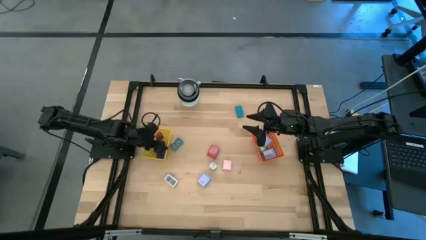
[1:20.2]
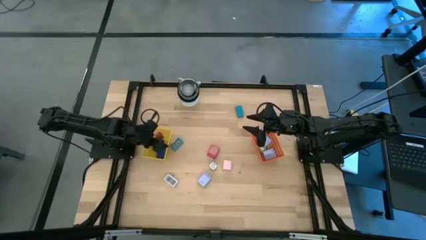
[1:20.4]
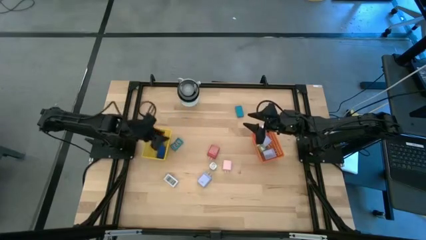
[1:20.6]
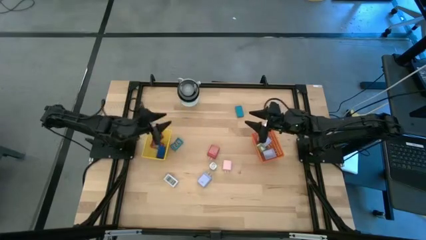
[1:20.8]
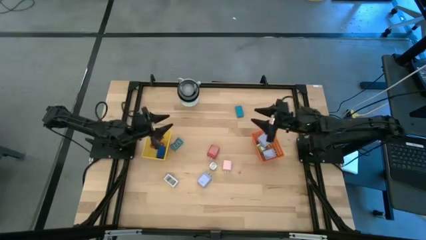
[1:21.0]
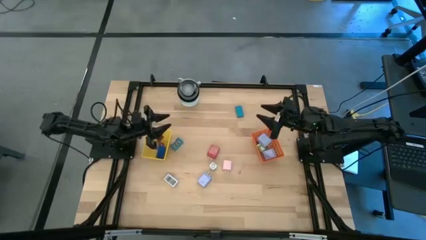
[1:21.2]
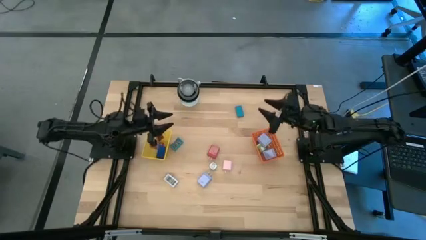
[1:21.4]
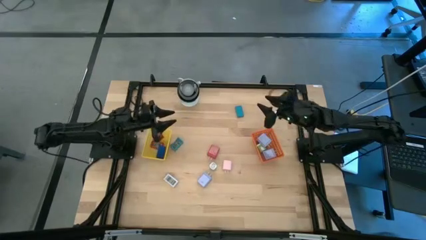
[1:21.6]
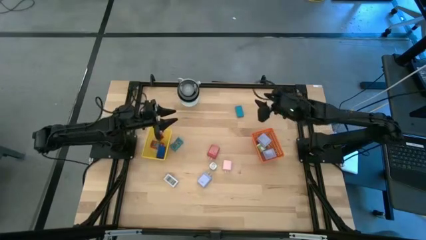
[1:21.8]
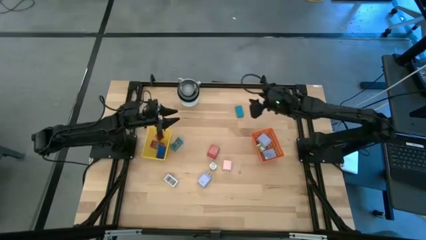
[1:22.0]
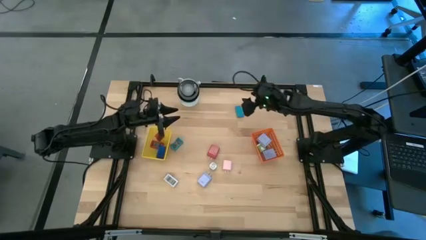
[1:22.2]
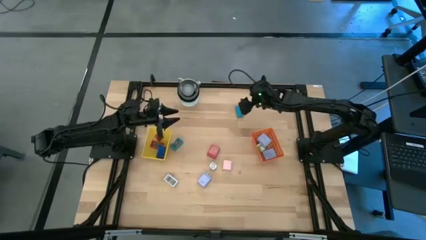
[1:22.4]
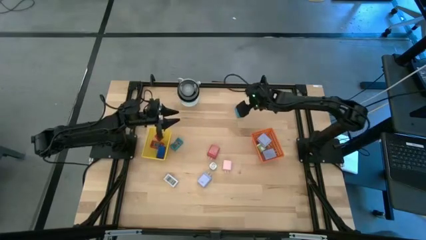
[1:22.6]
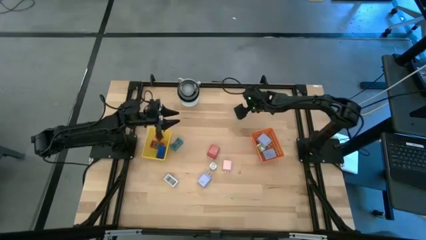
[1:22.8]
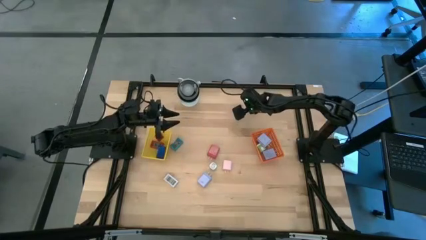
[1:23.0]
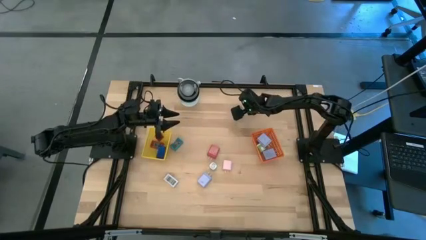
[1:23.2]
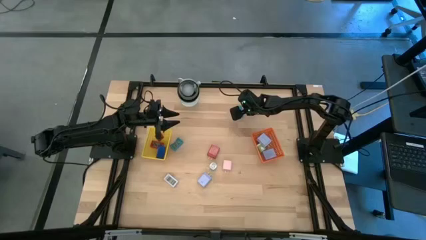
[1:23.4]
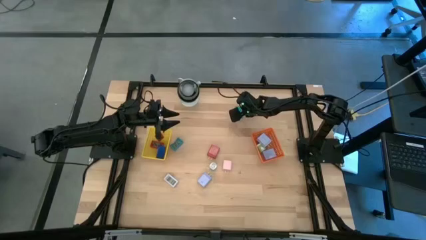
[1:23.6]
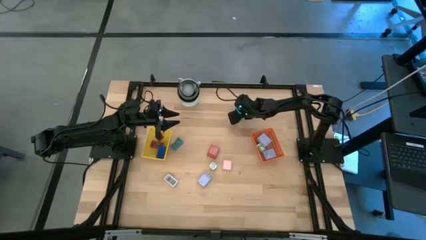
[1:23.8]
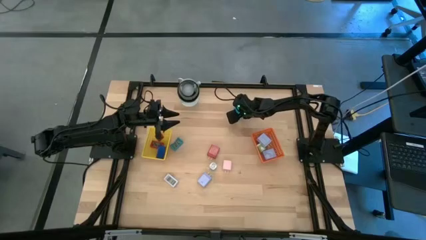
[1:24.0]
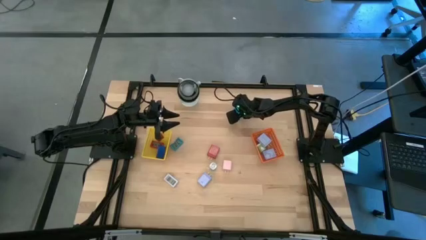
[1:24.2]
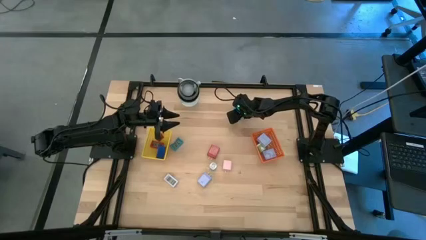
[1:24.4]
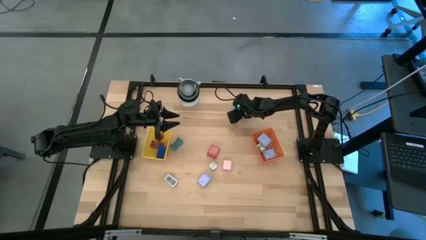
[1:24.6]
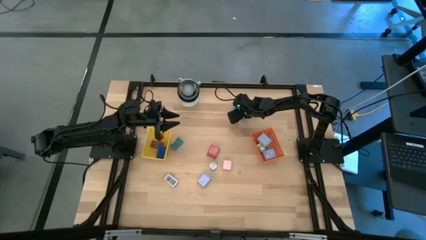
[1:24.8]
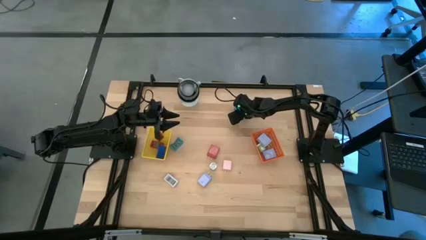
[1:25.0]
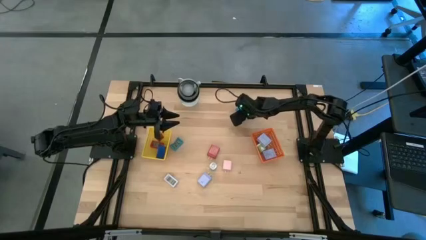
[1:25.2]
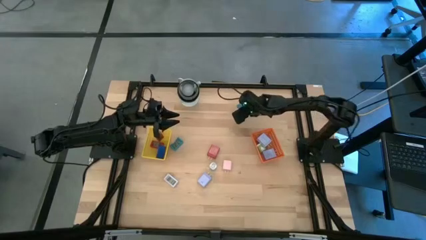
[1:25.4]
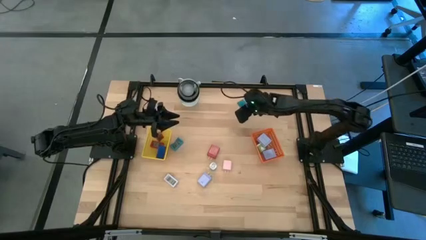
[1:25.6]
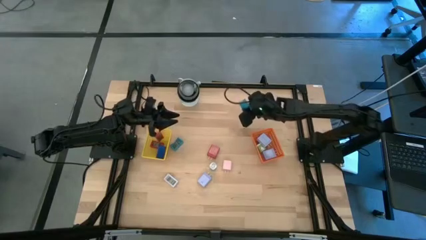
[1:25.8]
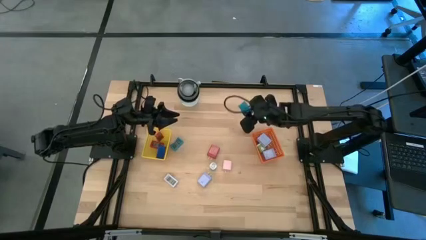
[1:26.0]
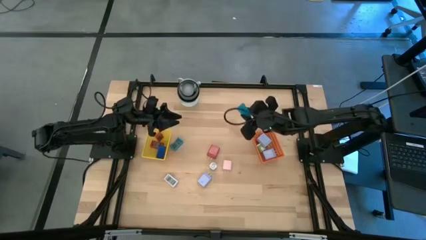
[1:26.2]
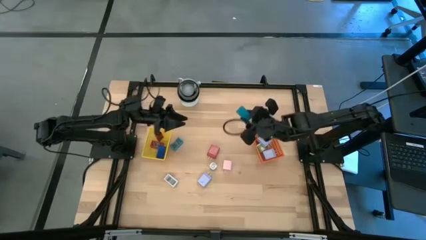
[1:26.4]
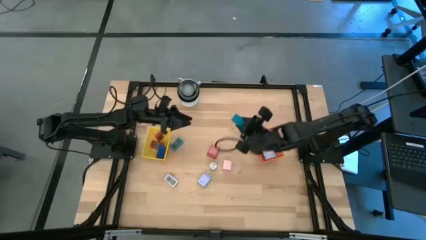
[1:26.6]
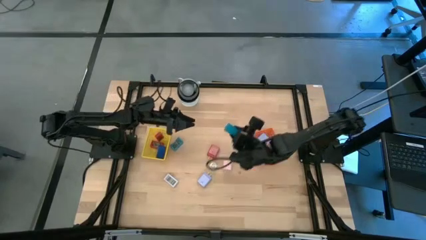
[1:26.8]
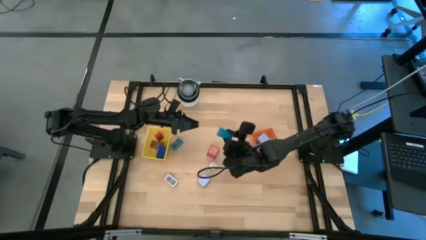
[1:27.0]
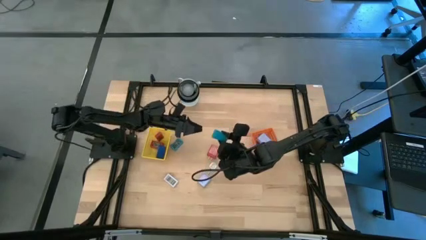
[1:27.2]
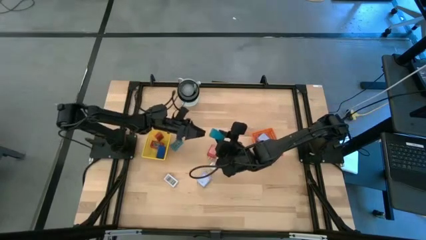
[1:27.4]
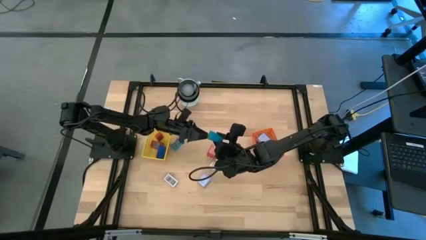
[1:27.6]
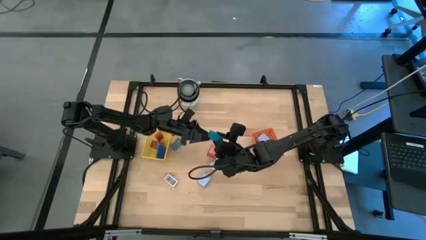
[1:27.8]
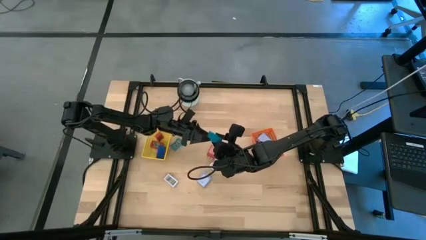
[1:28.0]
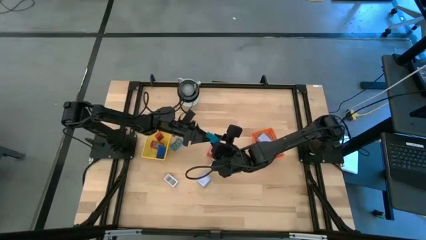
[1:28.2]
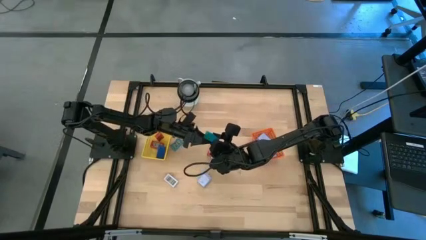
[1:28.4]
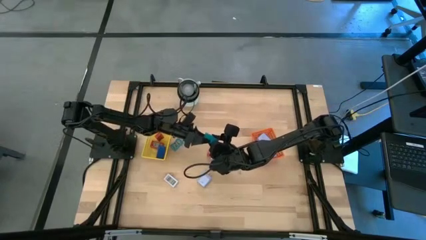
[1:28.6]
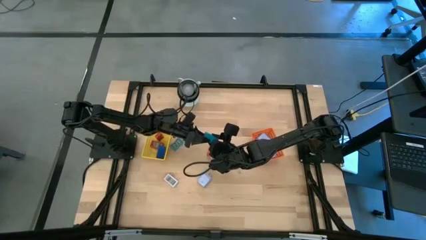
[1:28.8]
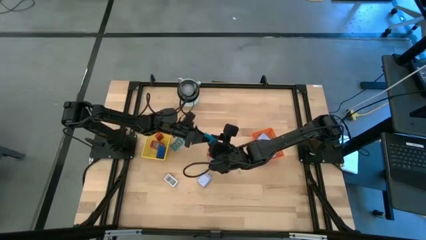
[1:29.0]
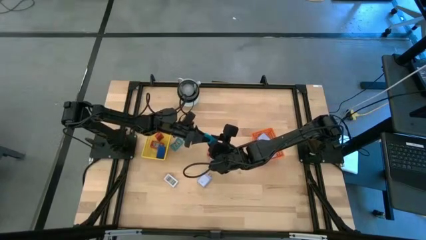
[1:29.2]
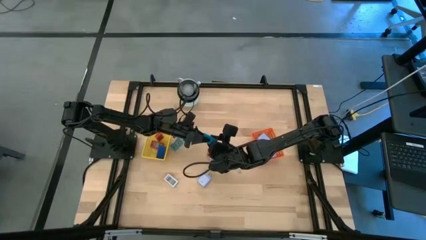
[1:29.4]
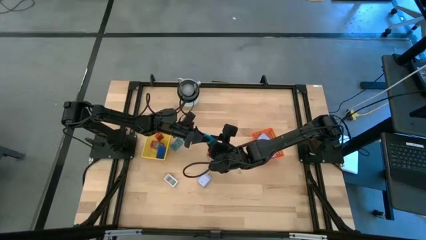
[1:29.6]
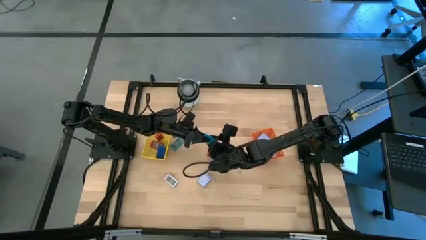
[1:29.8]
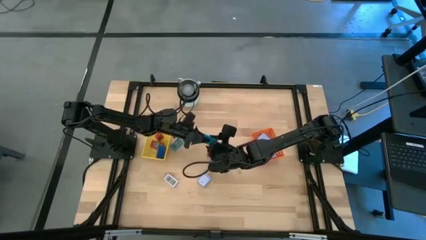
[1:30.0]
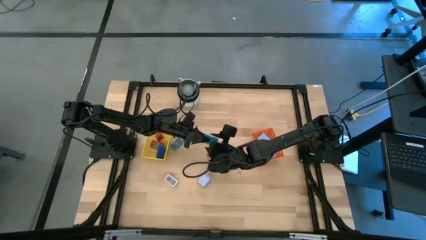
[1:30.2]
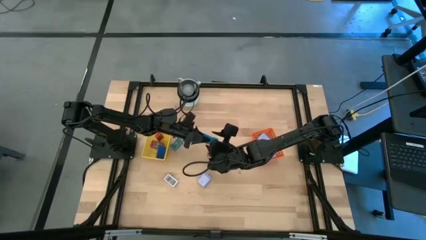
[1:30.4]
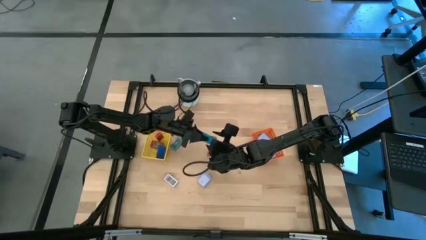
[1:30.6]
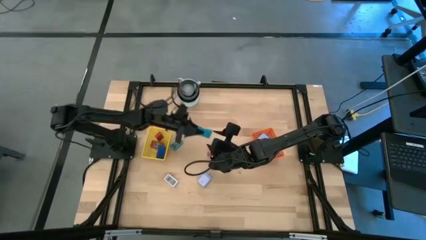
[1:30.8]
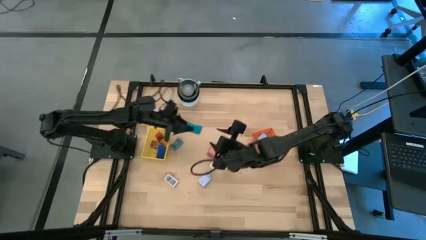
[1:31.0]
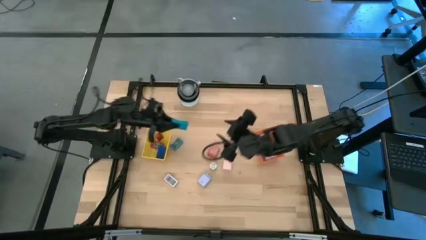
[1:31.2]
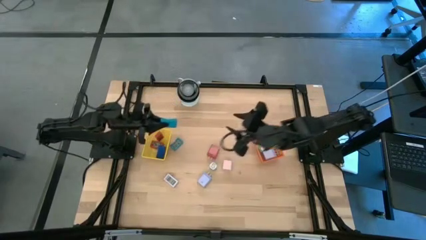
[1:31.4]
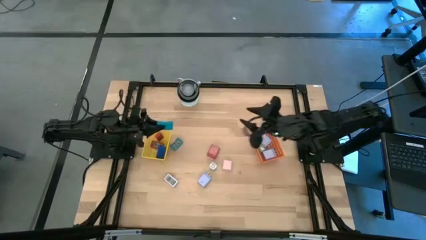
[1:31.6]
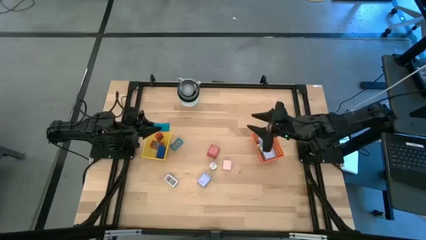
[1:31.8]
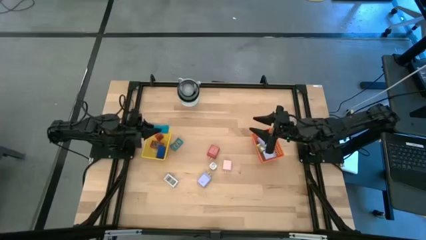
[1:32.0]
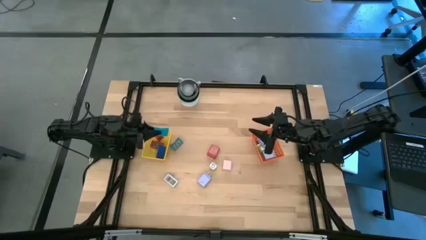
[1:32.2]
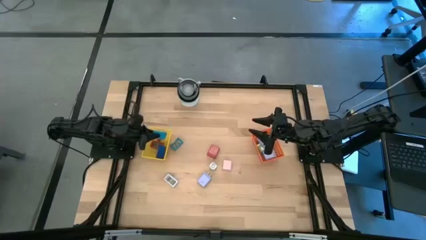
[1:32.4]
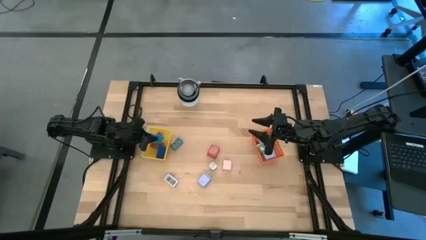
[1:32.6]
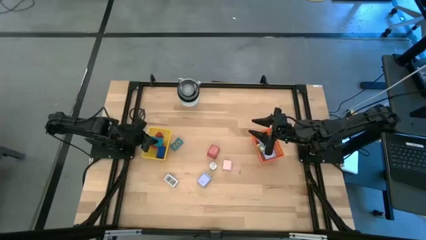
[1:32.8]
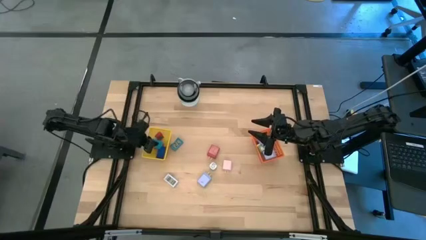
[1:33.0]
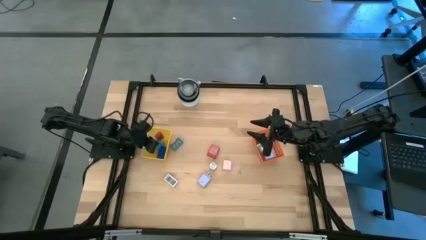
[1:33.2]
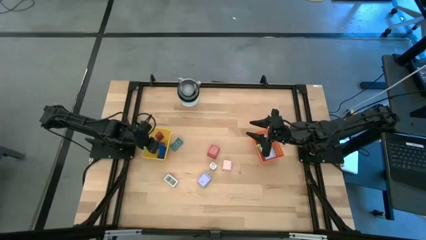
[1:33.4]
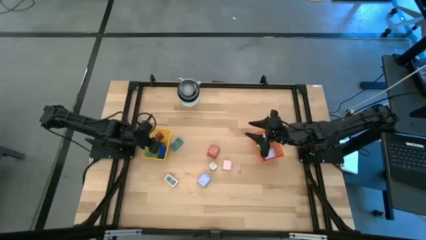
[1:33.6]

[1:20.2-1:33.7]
Task: Pick & Place Office items
Put the top light blue digital clock into the yellow basket
